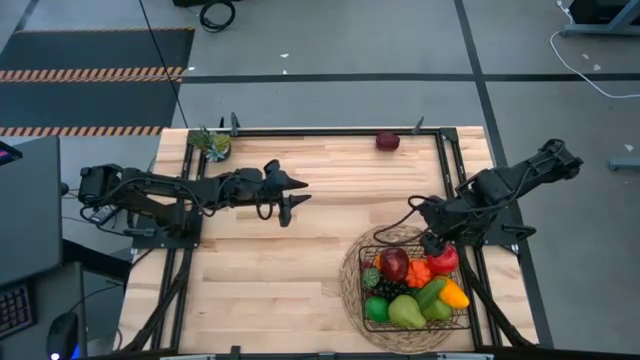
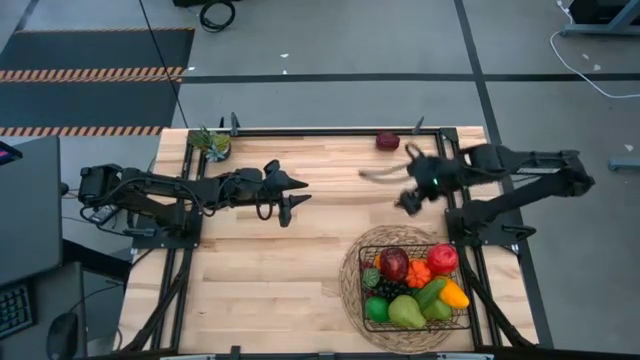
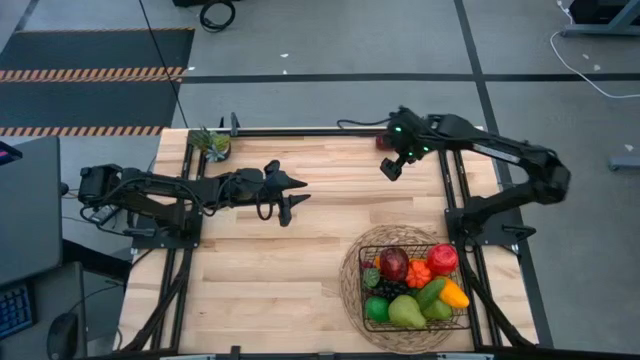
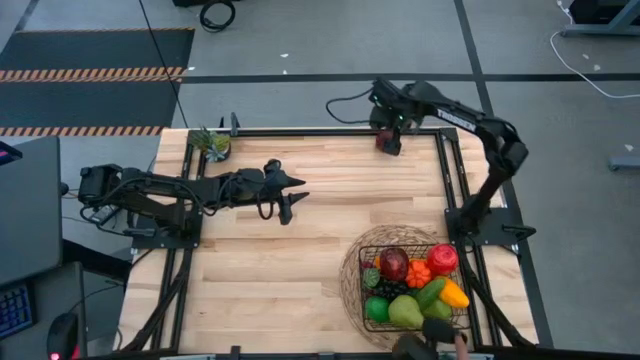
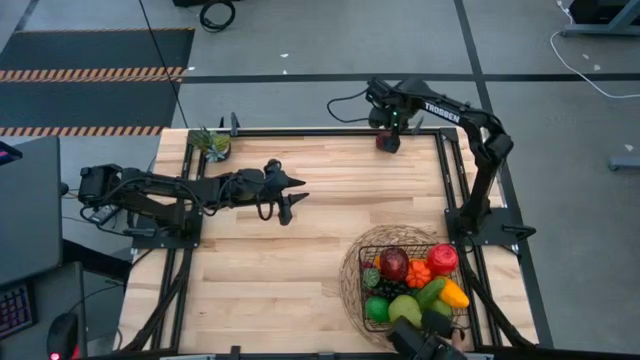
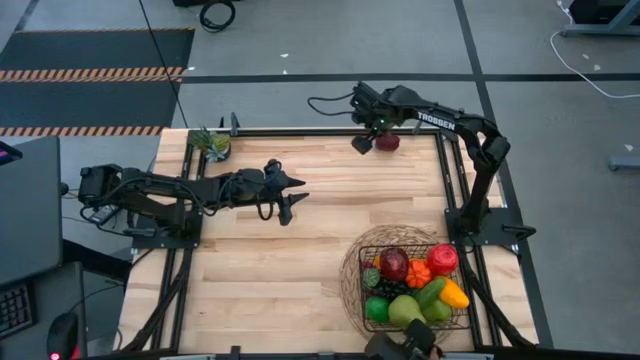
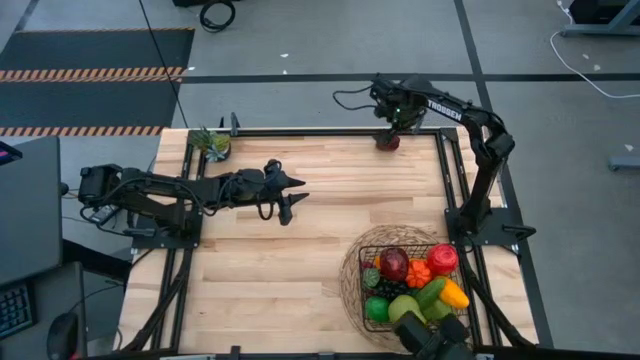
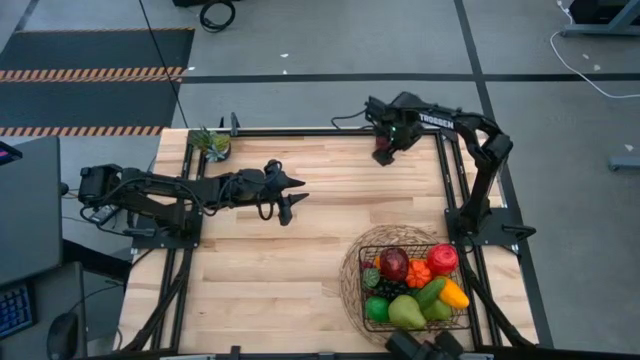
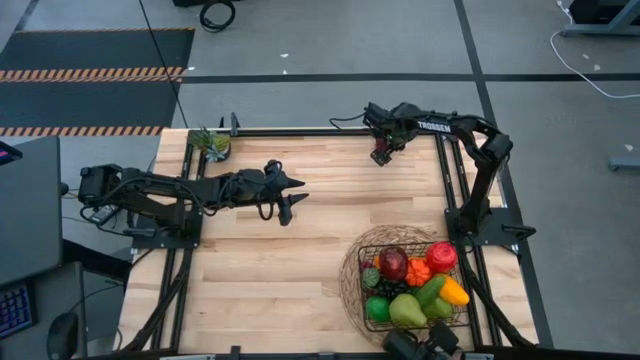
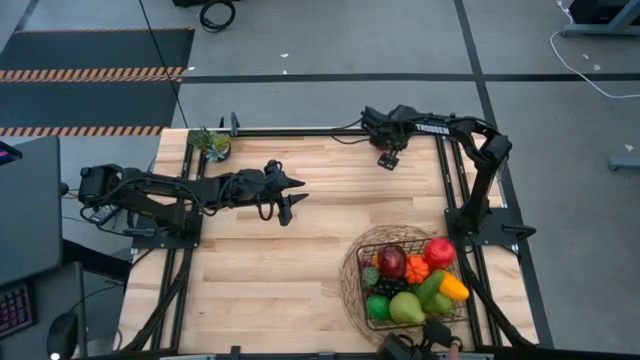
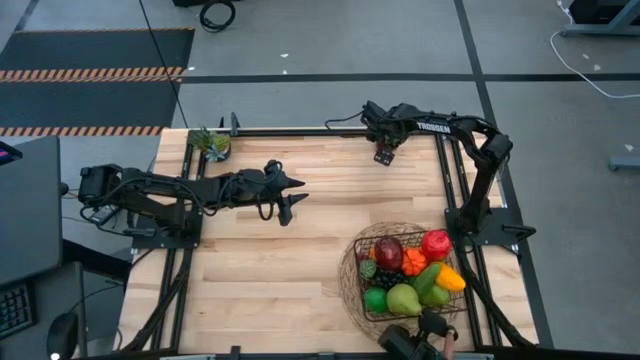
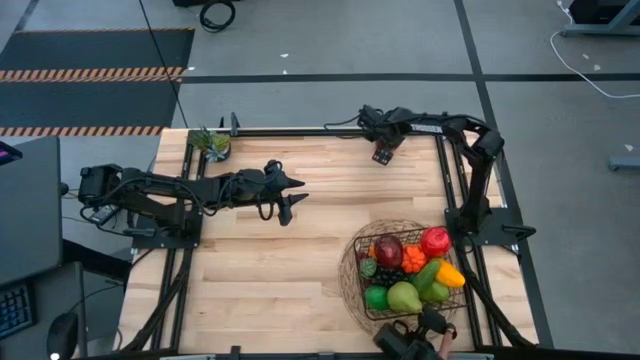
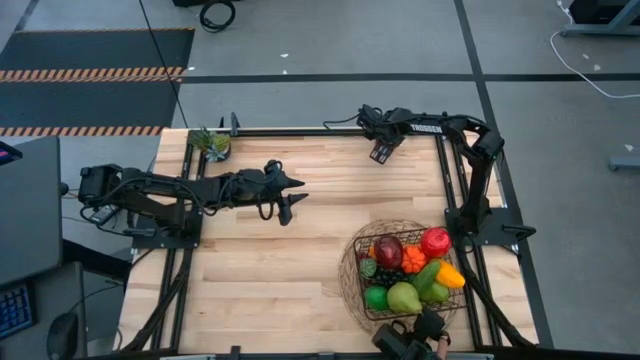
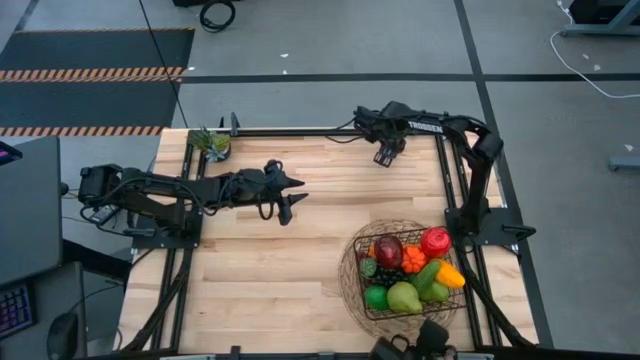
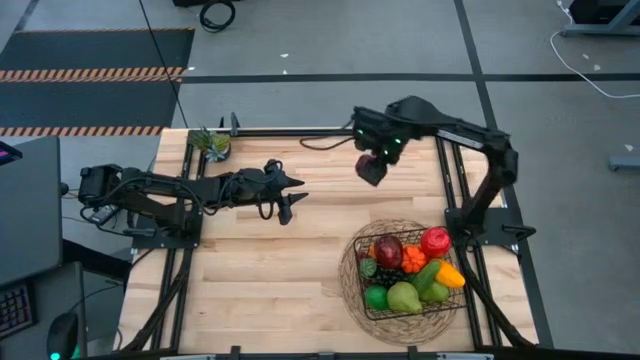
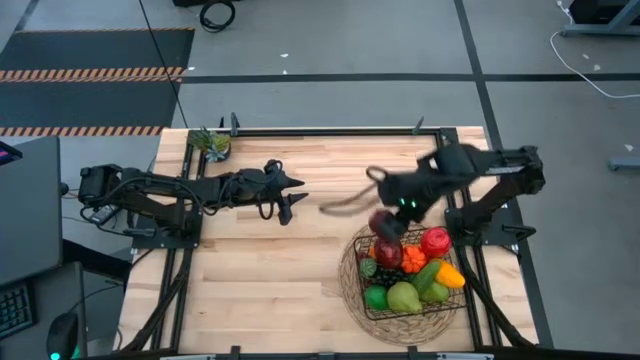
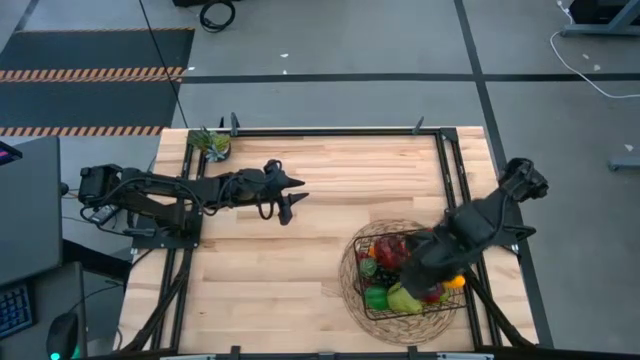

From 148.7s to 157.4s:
Task: Build produce basket
Put the dark red apple into the black wire basket

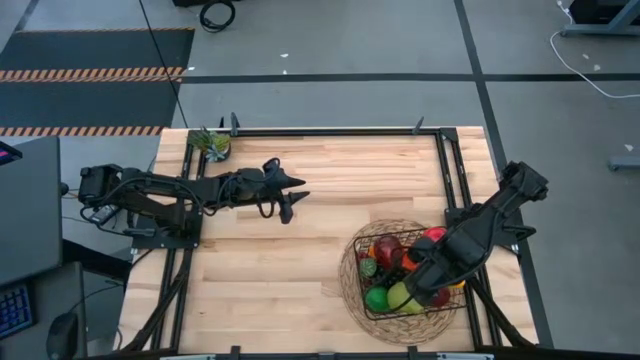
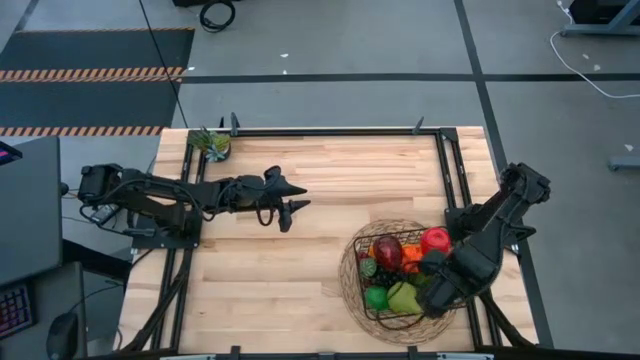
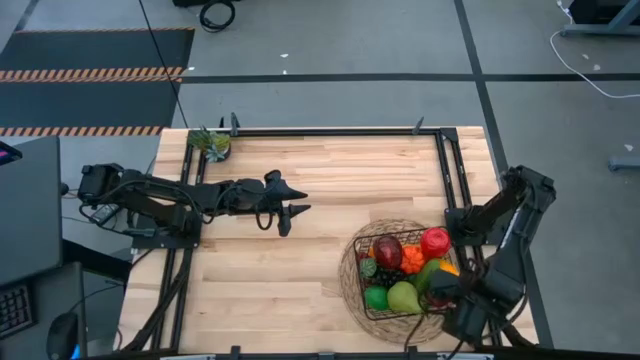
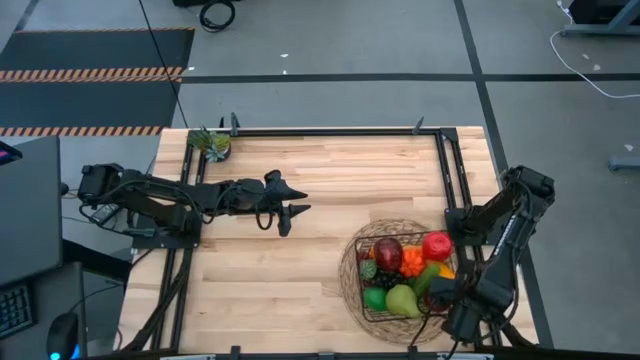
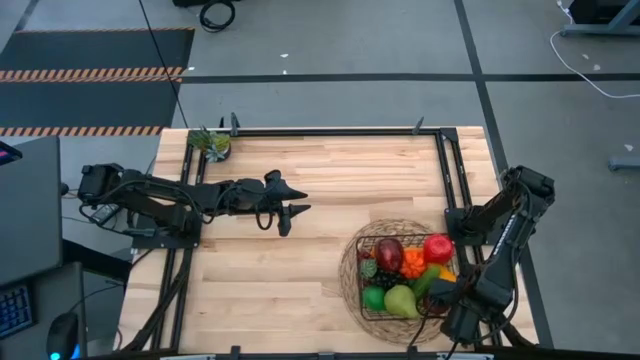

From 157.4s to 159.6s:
Adjust the black wire basket

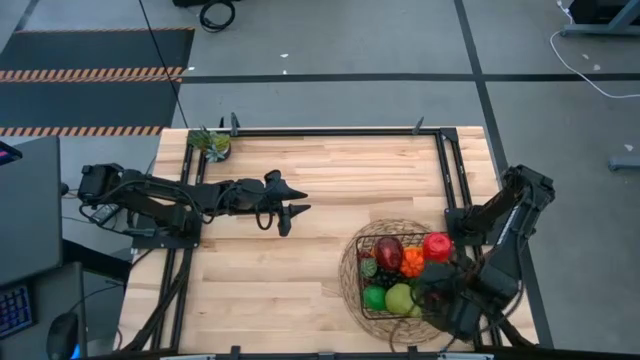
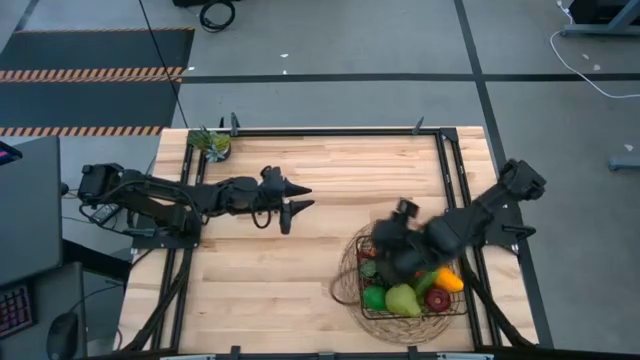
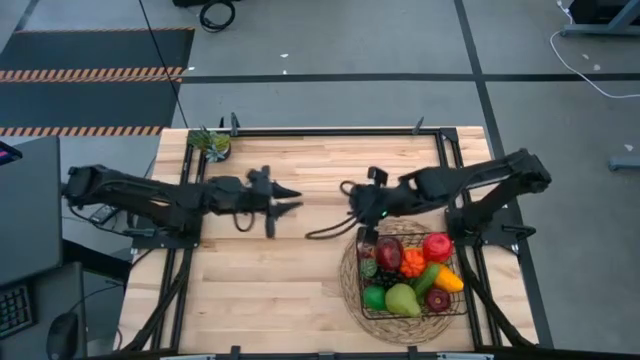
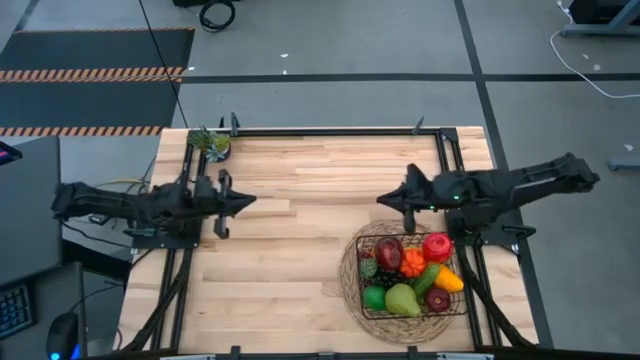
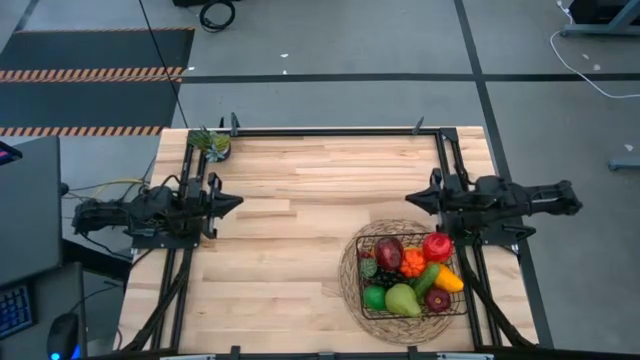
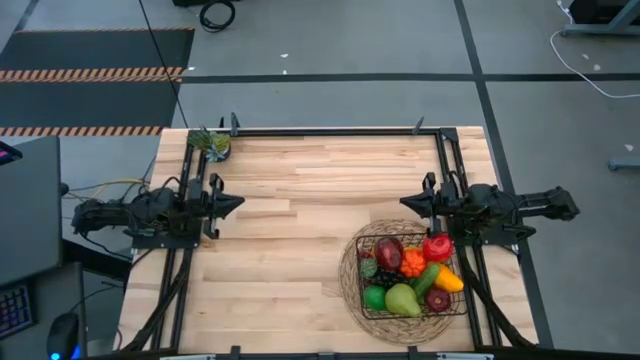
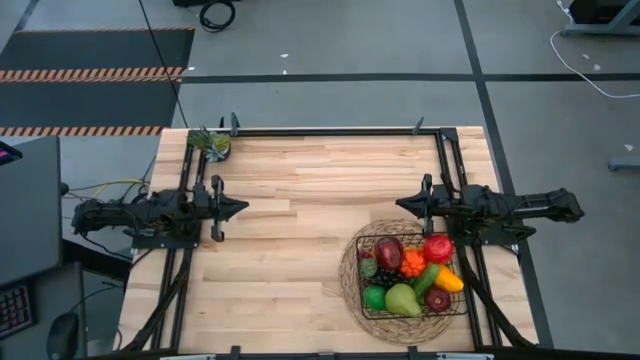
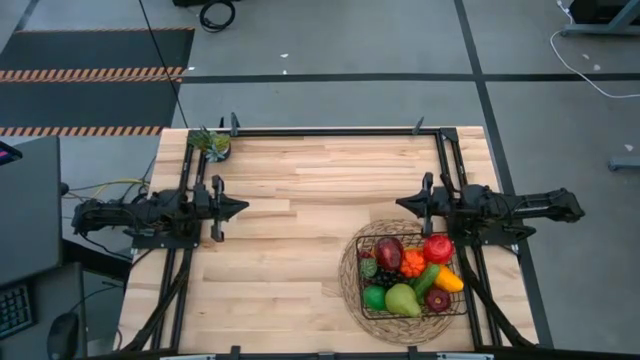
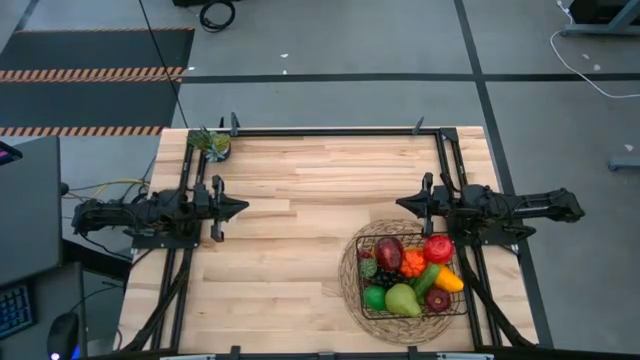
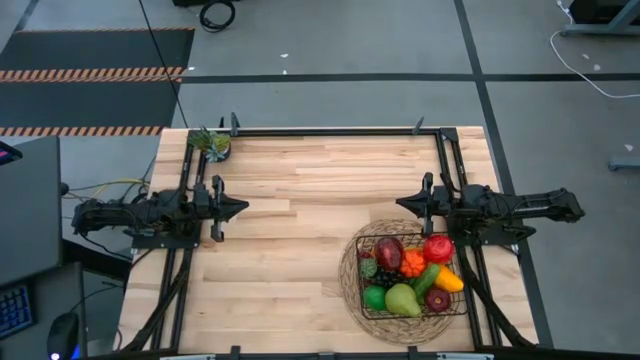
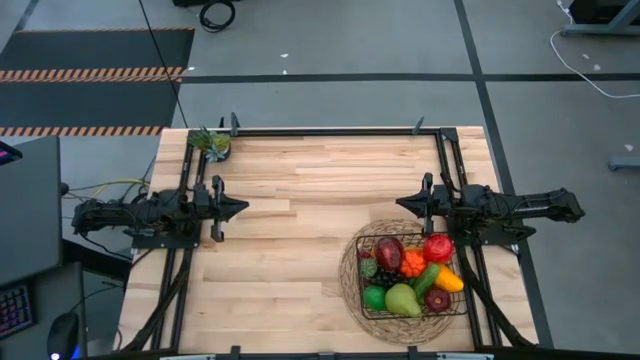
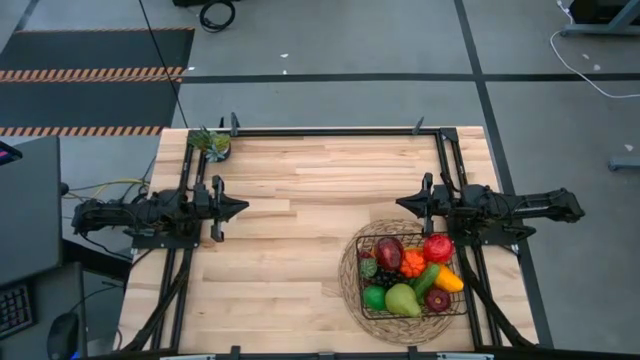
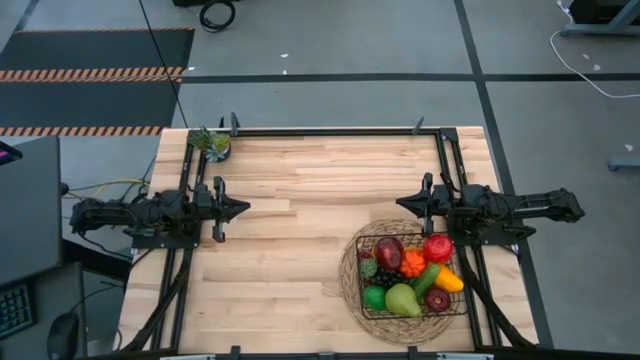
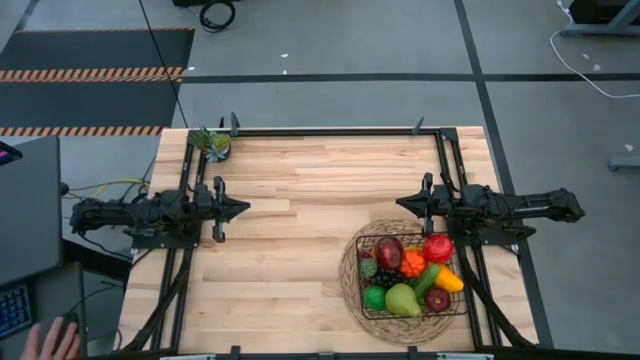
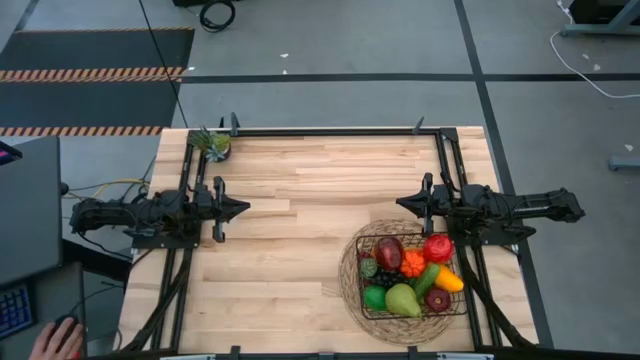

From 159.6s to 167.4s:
Return to Home Position

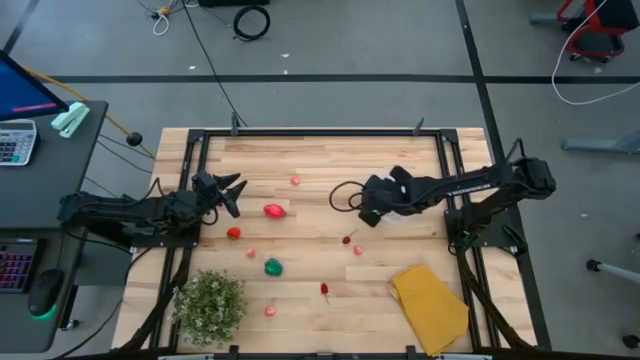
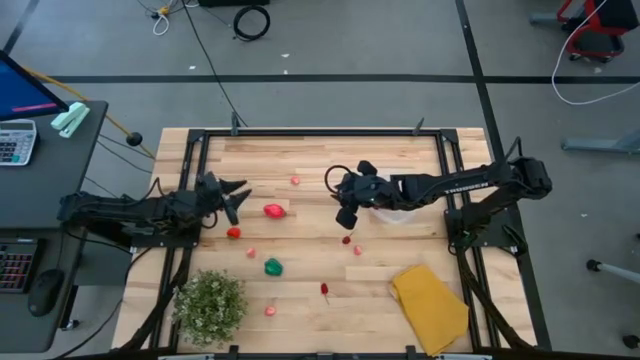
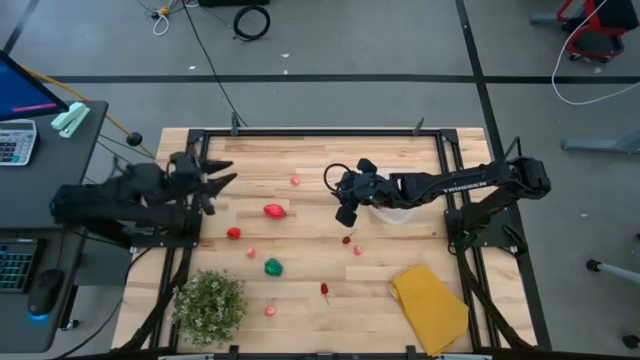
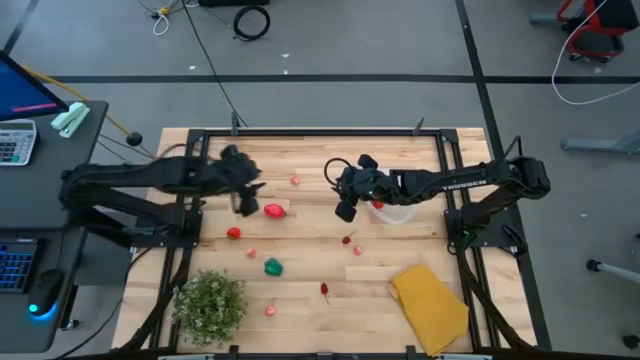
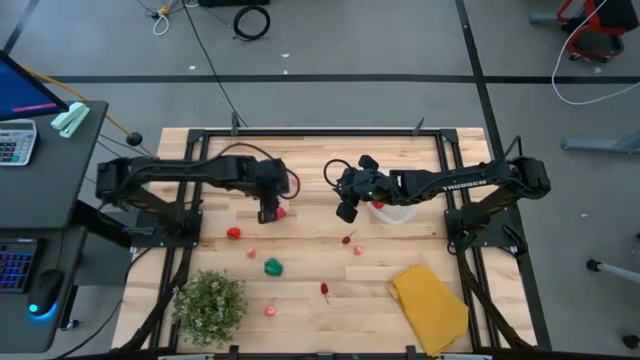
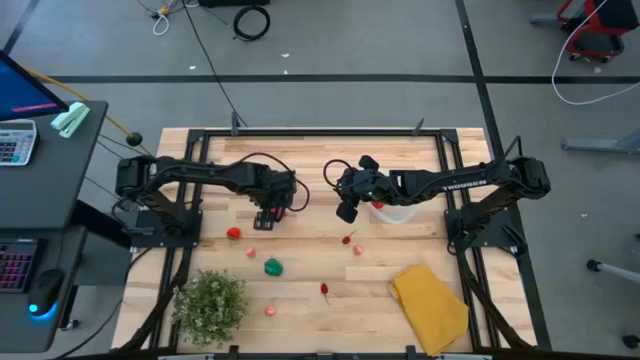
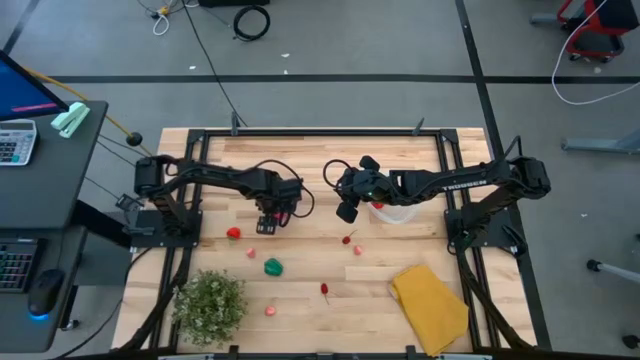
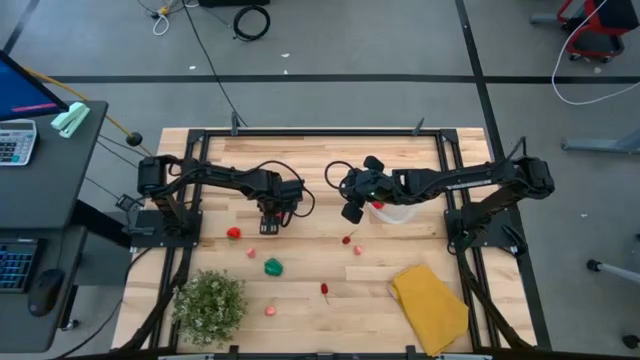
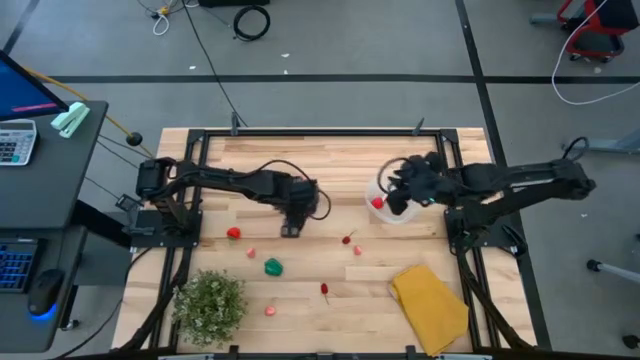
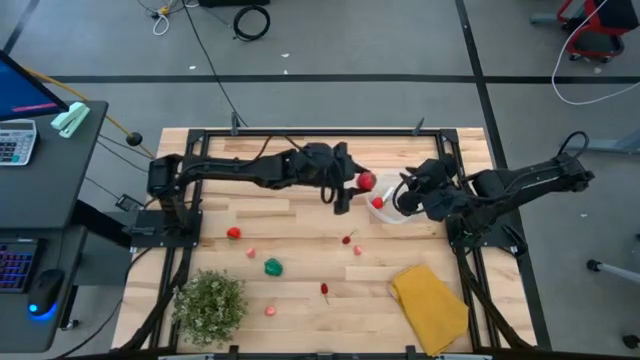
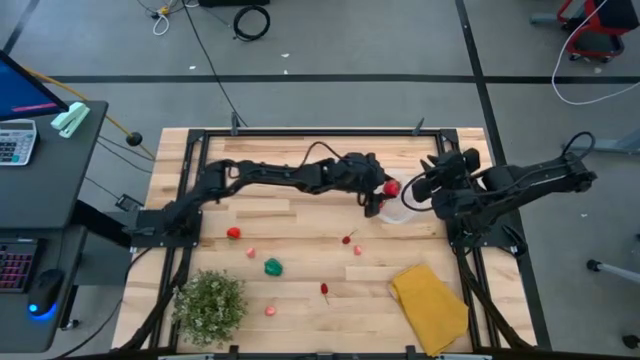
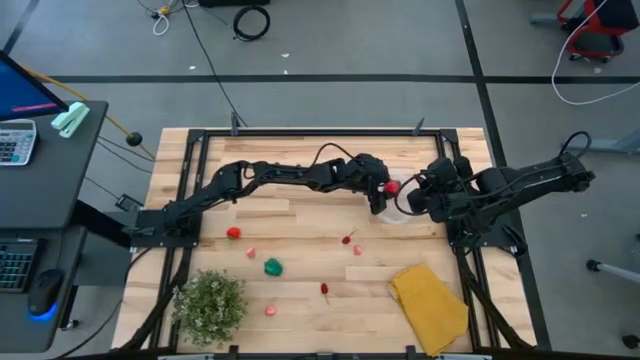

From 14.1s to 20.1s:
Task: Pick and placing Produce into tupperware
Put the pink dragon fruit into the transparent container
